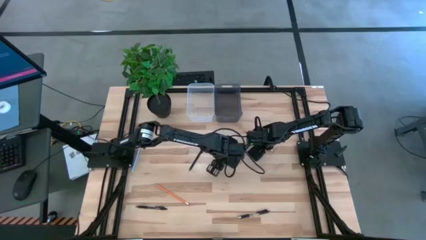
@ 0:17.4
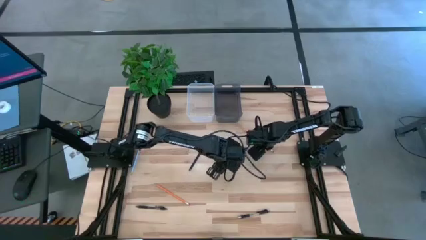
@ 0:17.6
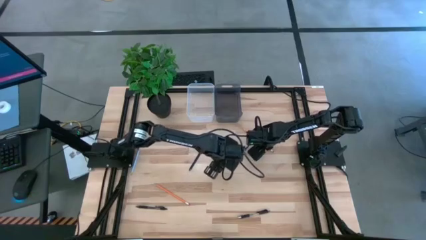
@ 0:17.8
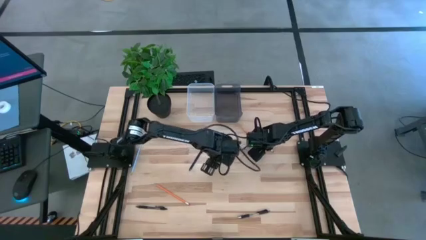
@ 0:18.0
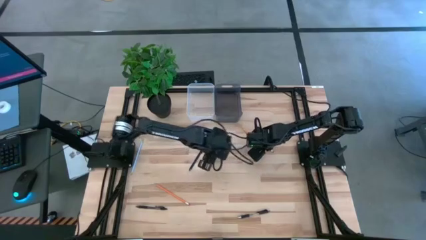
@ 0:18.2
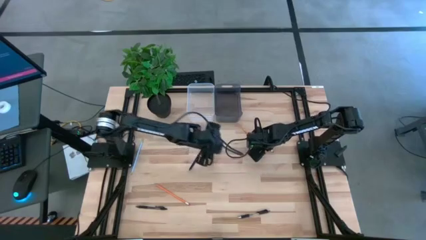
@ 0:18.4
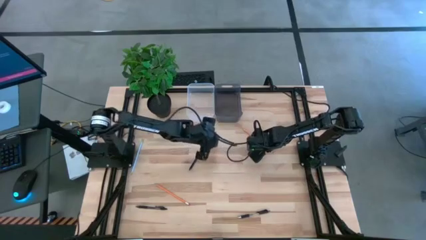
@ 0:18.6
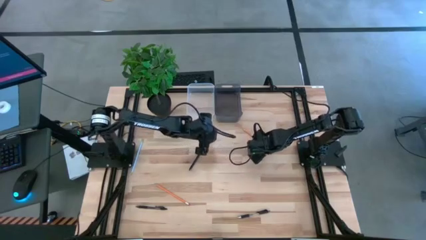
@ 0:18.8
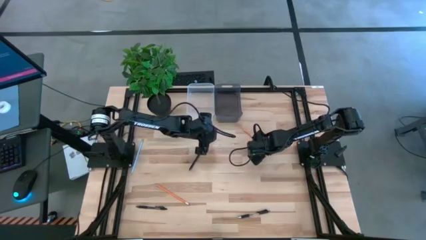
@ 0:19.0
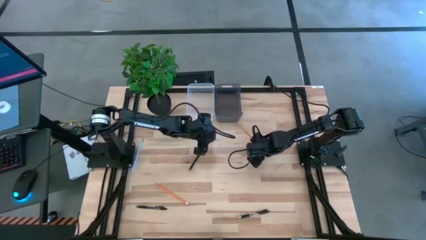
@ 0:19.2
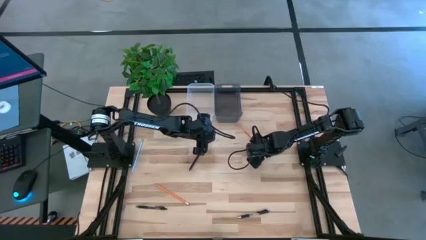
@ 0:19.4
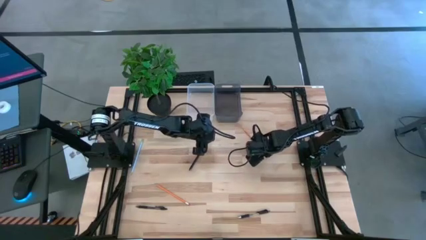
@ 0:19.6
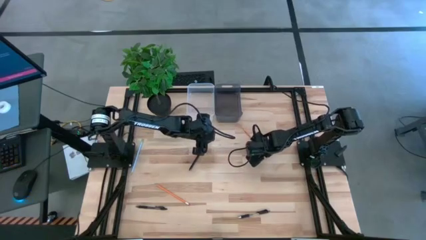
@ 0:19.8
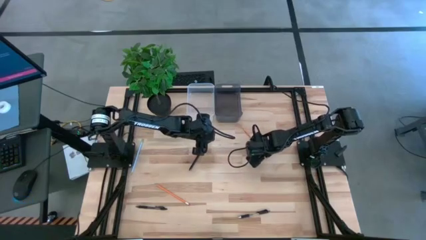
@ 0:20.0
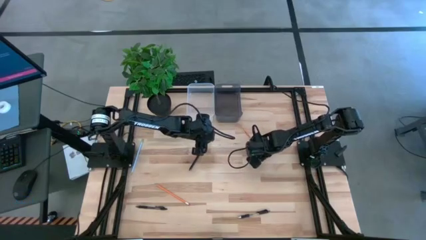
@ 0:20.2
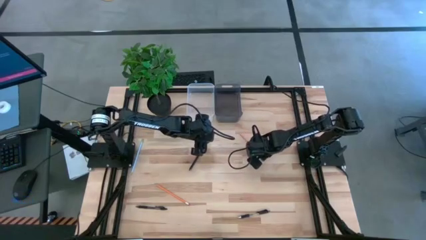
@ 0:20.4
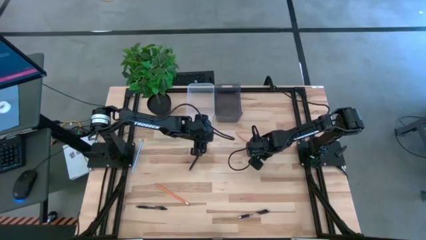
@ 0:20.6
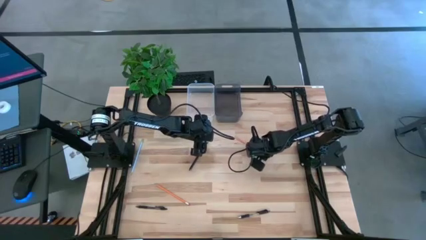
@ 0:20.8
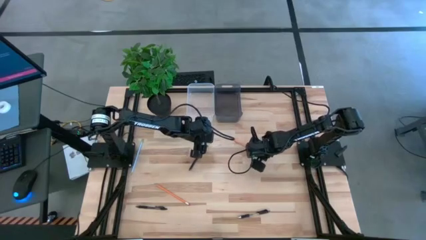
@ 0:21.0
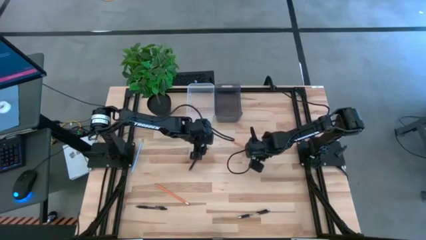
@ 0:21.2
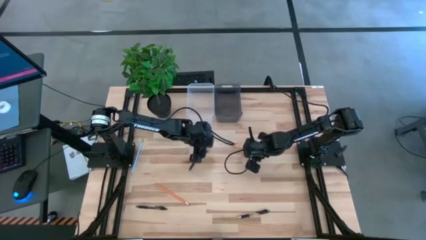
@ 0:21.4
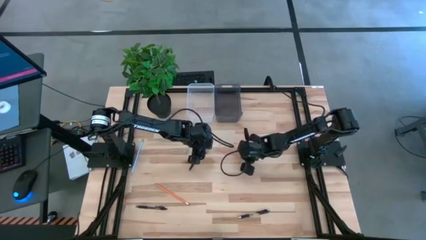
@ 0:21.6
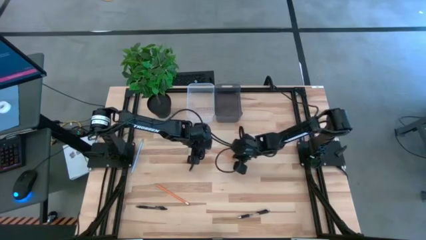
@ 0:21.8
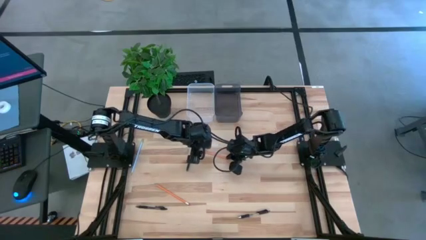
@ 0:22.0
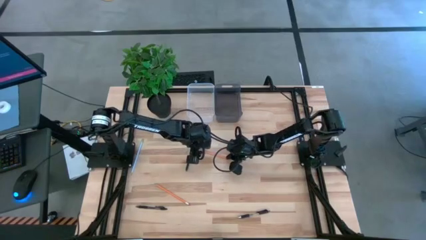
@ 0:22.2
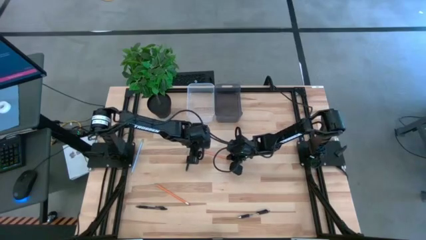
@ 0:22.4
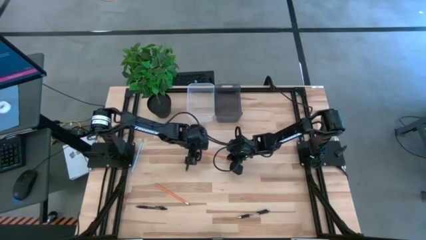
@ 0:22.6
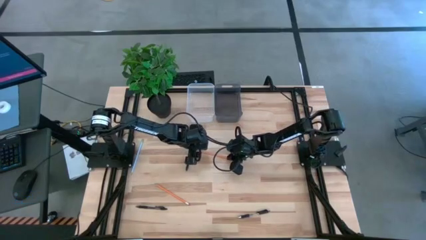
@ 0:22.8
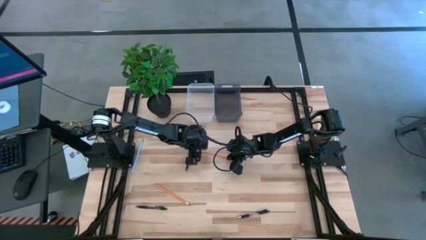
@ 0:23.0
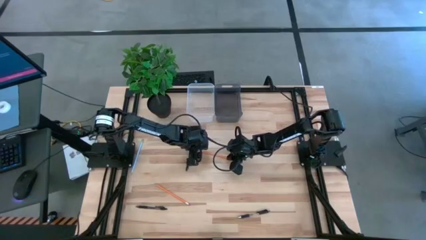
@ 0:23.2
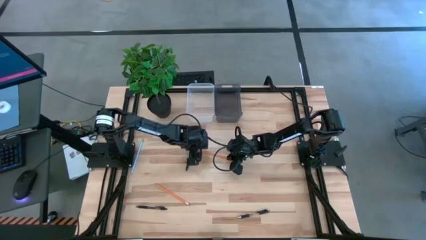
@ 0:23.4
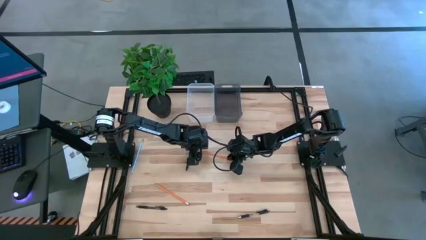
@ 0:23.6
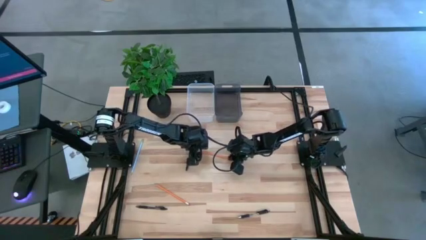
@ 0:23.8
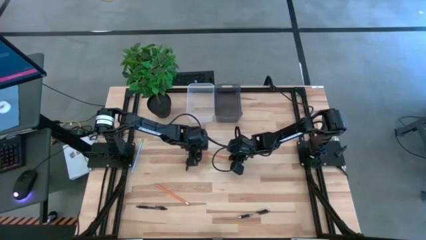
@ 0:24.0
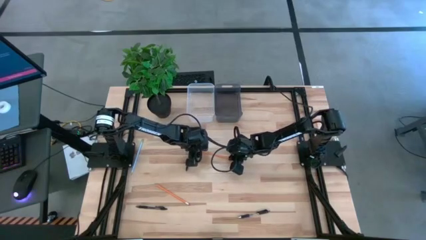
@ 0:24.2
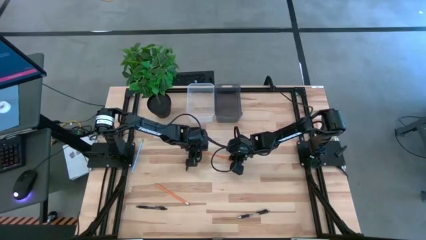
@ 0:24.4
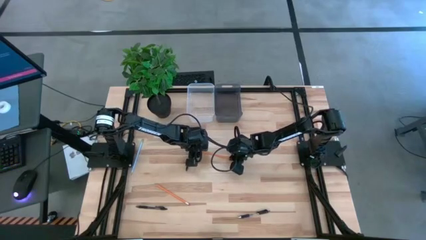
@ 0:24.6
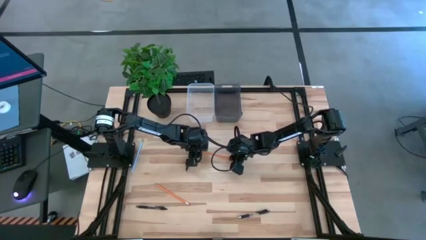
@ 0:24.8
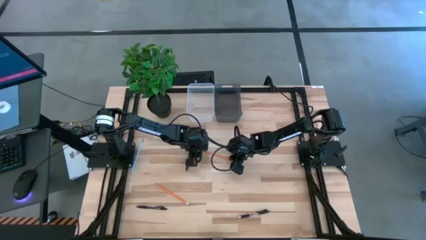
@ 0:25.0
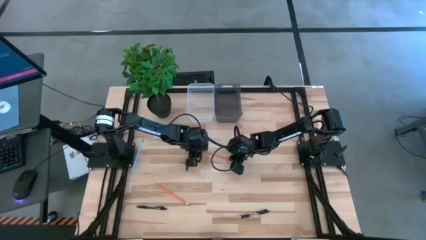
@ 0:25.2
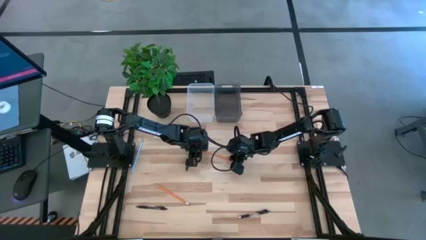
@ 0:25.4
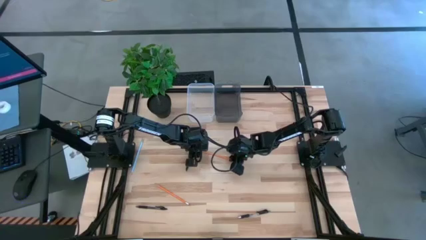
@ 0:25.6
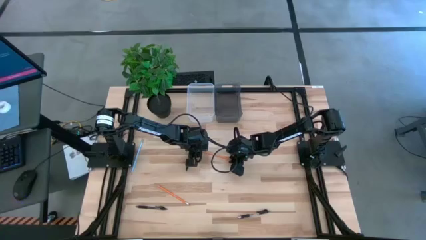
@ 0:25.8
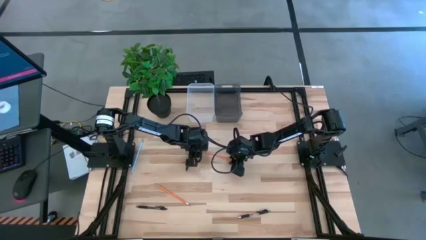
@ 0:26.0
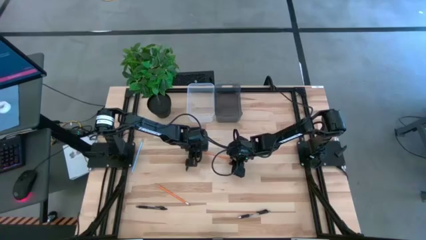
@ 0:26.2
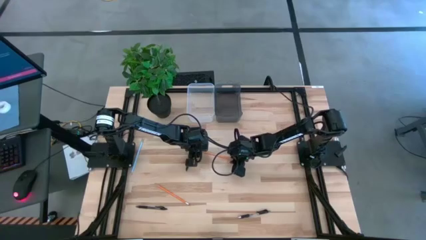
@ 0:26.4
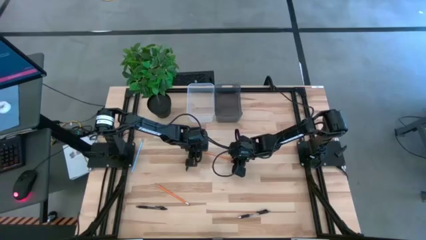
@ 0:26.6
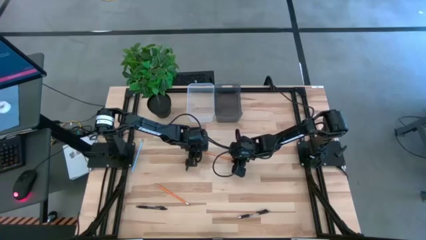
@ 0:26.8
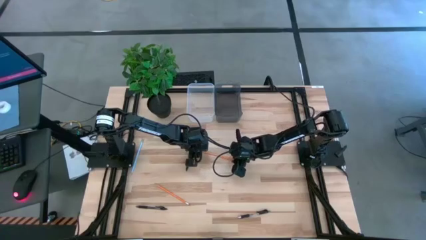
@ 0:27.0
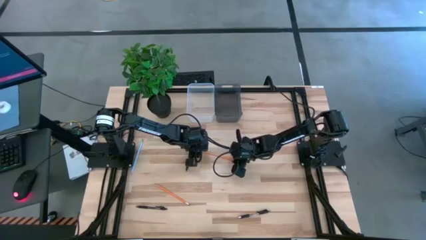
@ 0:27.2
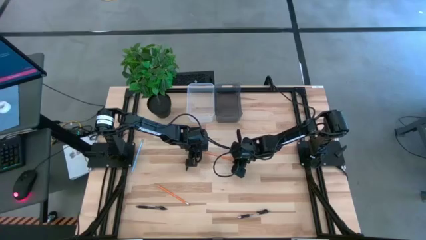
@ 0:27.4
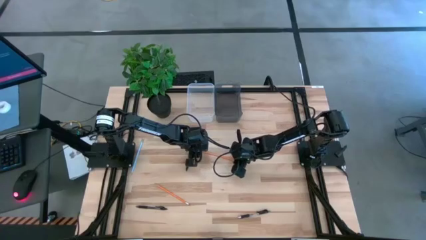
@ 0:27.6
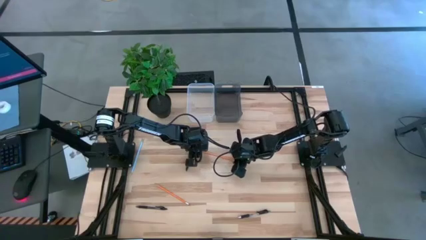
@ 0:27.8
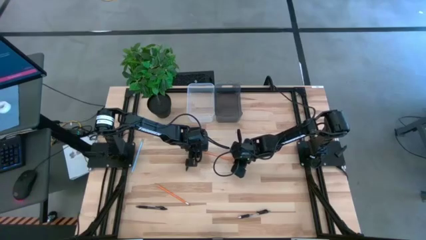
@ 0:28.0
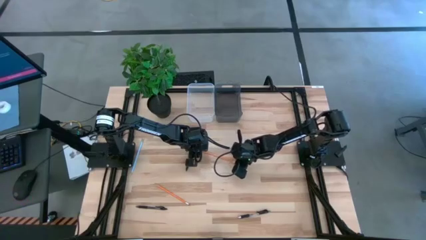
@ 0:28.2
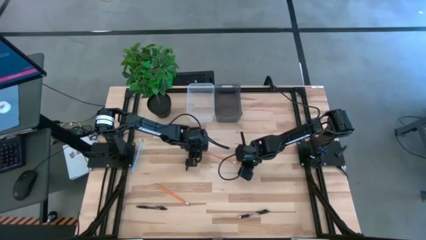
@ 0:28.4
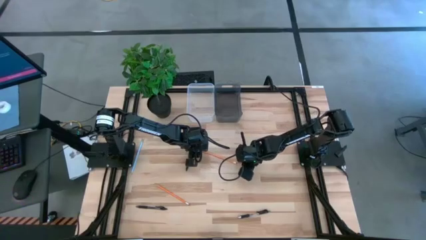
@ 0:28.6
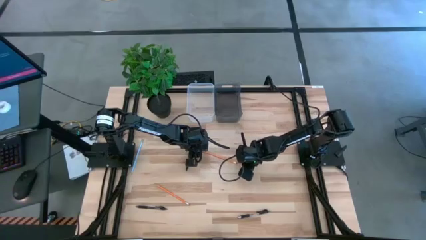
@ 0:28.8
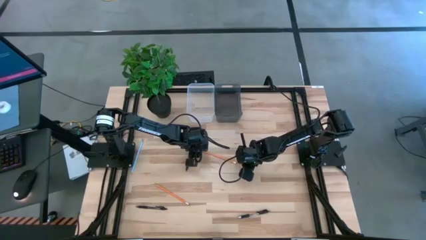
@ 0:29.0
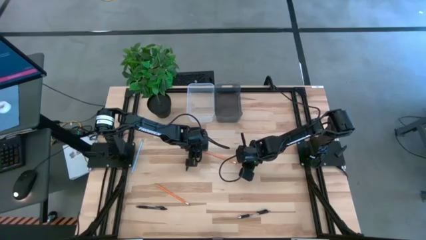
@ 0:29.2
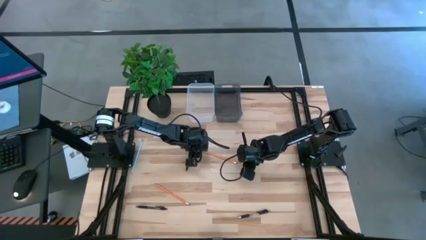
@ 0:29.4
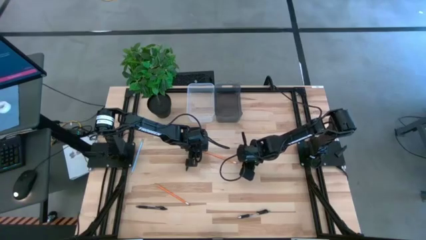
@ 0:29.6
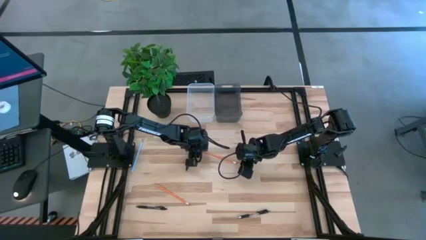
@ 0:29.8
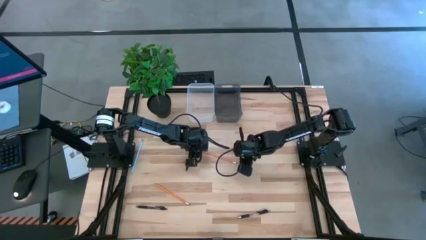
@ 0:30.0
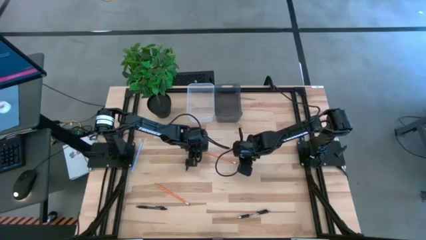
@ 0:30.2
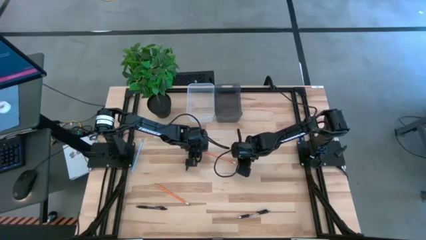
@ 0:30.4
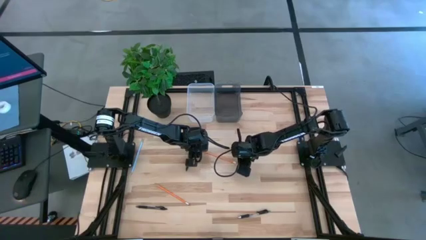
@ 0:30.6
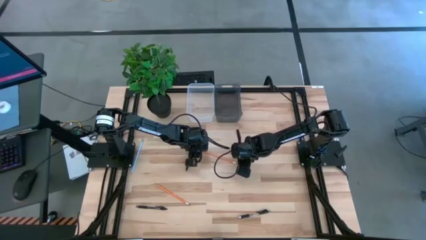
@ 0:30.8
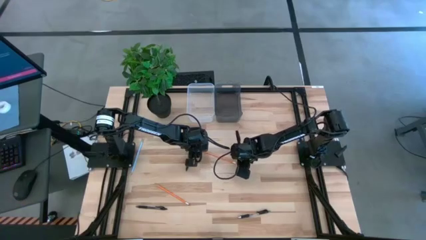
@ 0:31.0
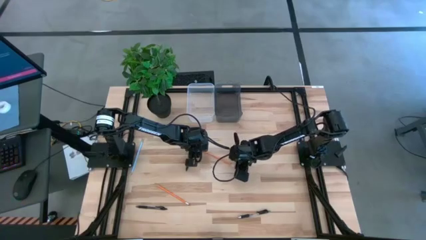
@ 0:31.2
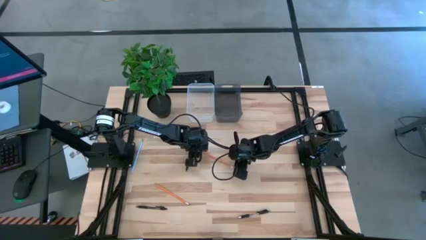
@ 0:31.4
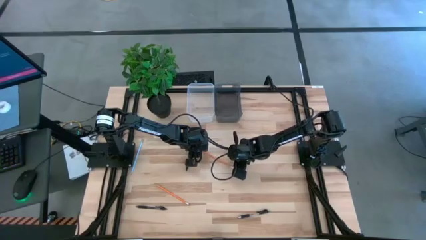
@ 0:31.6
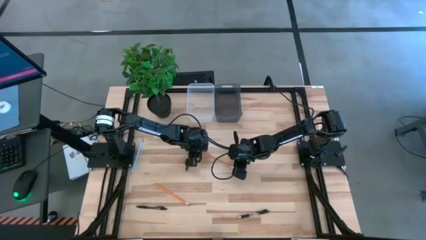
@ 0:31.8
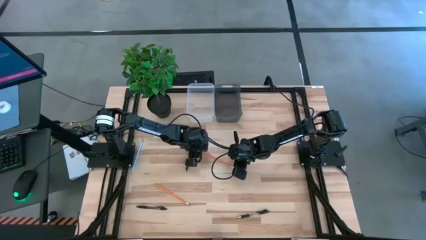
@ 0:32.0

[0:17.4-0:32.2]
Task: Sort pens & pencils
Put the top orange pencil into the transparent bin

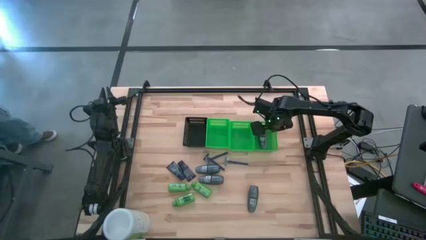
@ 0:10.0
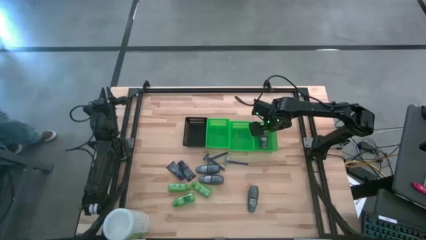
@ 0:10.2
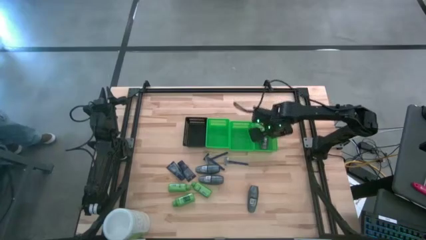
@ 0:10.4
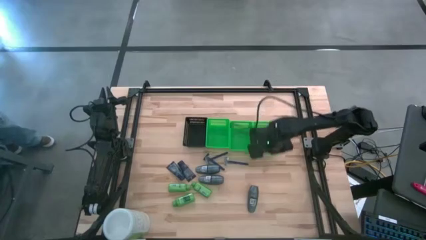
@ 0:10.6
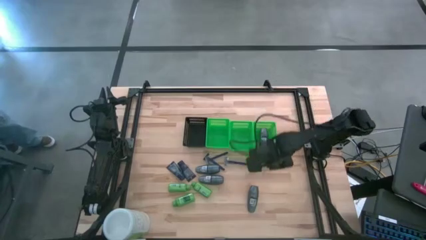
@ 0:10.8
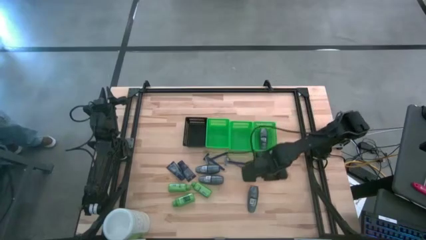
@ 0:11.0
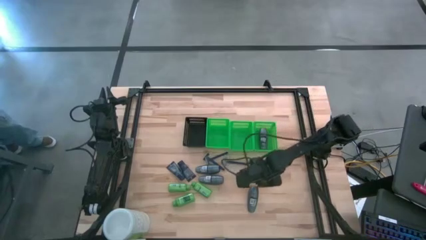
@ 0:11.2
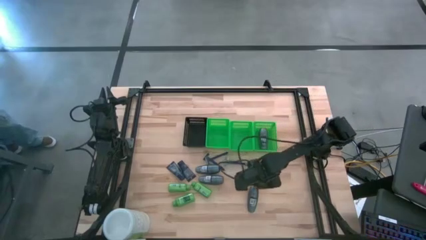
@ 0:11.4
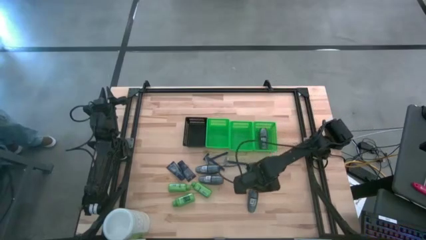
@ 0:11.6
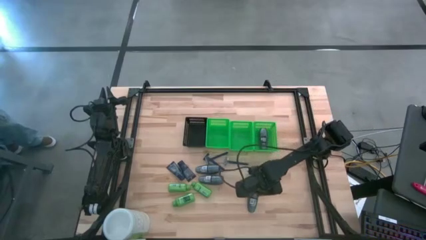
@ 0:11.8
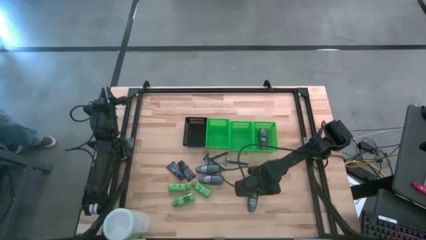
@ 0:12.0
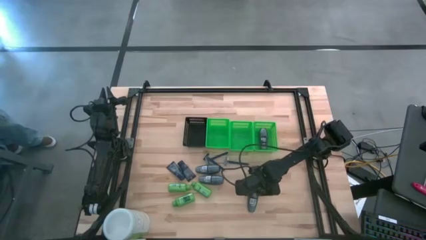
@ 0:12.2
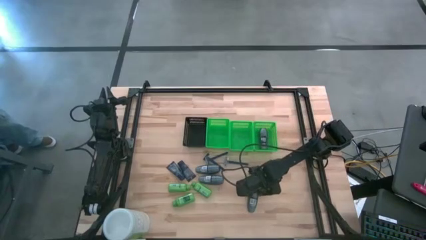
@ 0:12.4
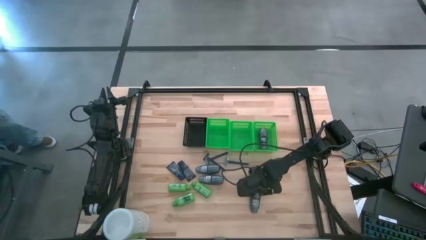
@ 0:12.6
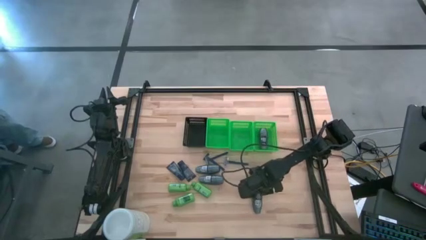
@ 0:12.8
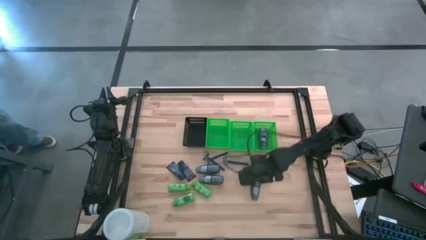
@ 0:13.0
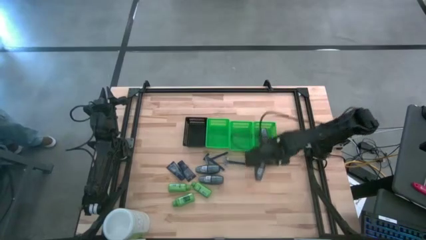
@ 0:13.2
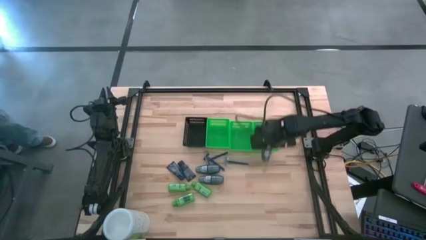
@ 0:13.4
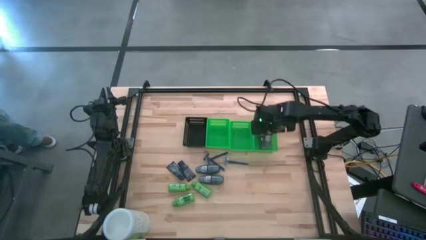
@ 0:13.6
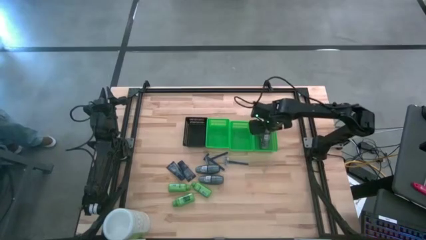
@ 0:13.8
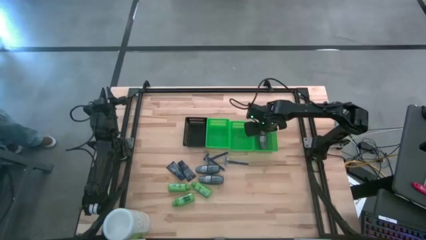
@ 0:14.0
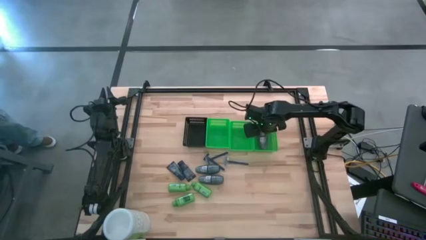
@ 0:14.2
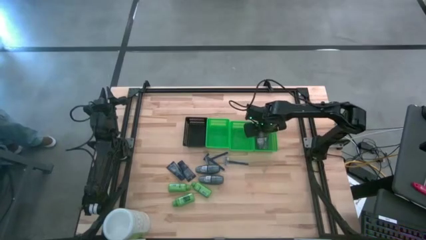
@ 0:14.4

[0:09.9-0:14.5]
Task: Pick & Place Travel size toiletries
Put the gray deodorant into the right green basket
